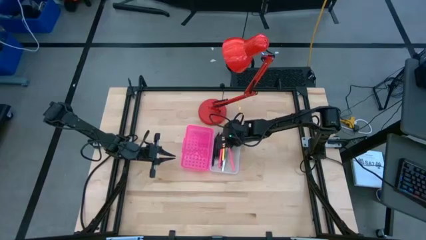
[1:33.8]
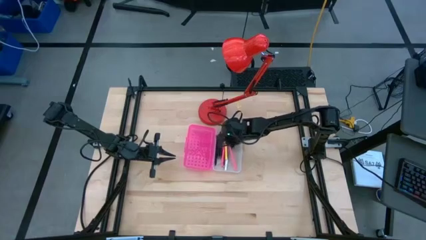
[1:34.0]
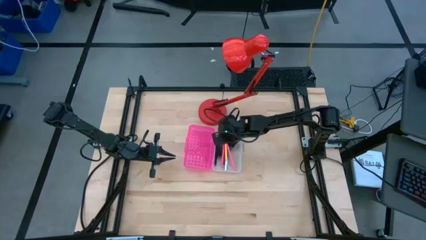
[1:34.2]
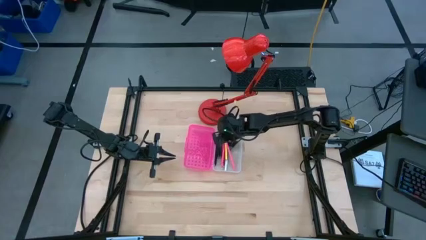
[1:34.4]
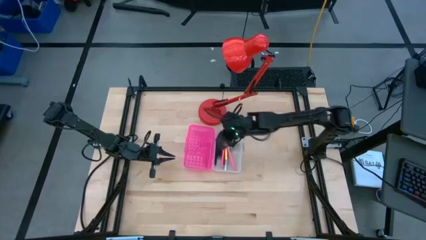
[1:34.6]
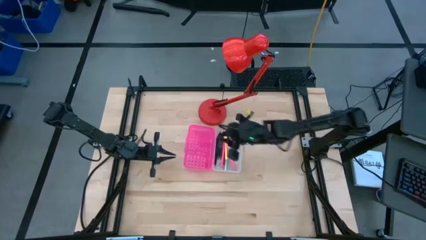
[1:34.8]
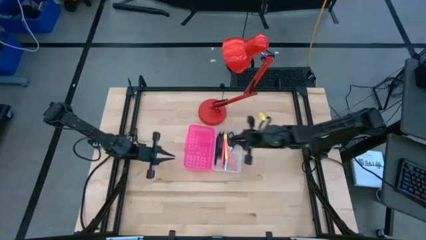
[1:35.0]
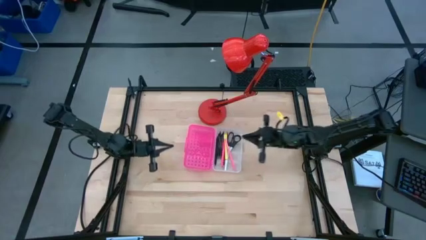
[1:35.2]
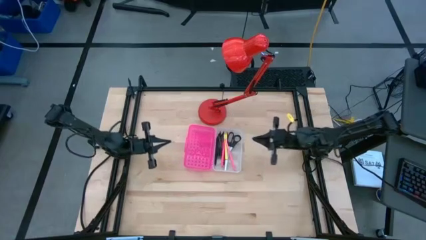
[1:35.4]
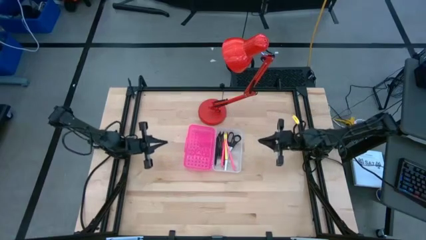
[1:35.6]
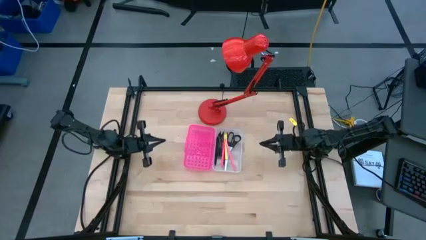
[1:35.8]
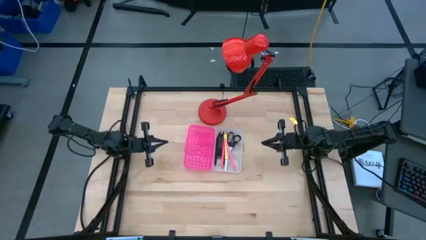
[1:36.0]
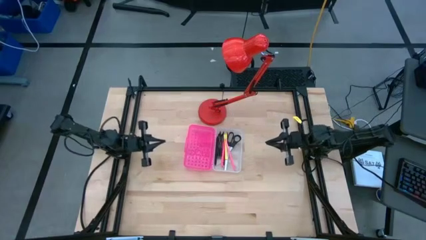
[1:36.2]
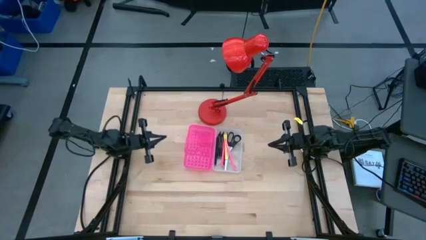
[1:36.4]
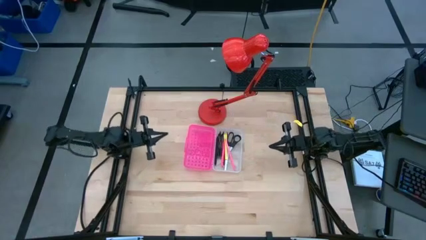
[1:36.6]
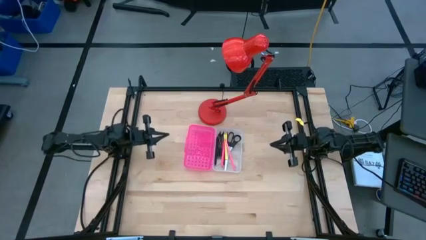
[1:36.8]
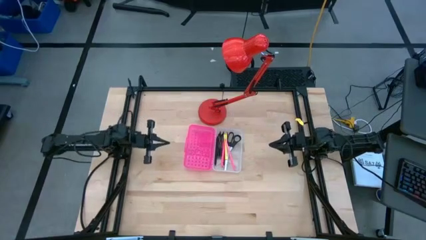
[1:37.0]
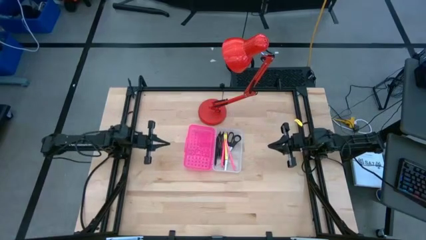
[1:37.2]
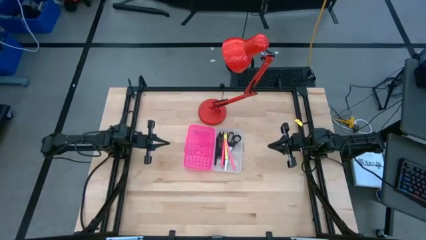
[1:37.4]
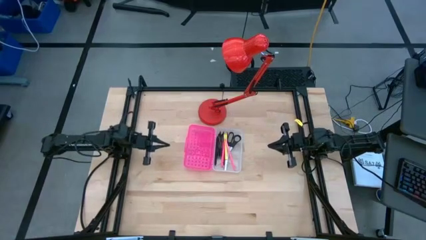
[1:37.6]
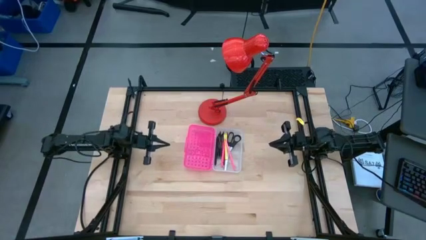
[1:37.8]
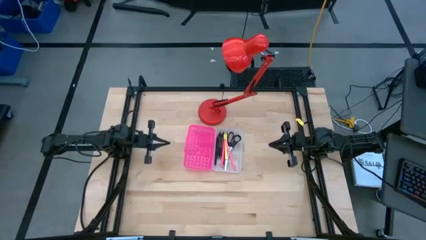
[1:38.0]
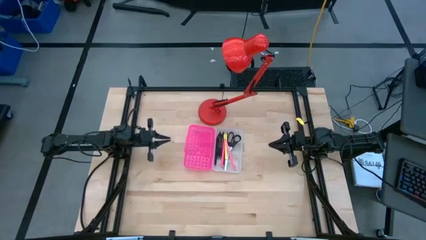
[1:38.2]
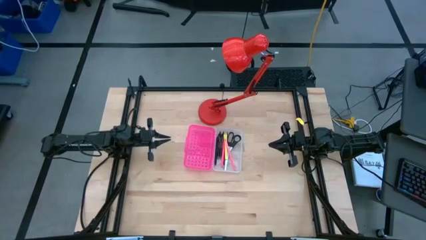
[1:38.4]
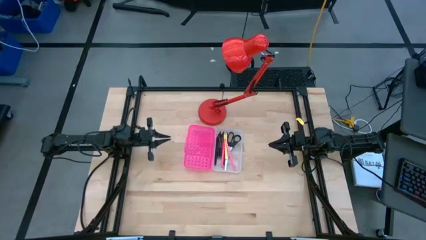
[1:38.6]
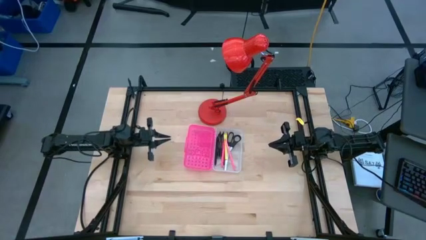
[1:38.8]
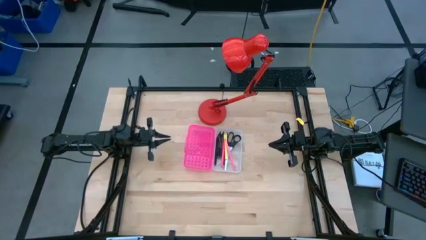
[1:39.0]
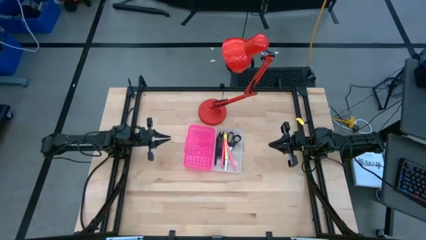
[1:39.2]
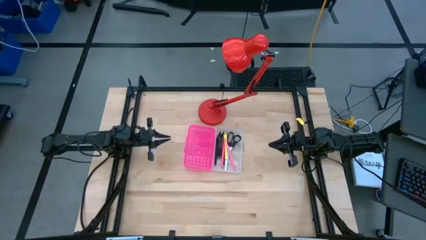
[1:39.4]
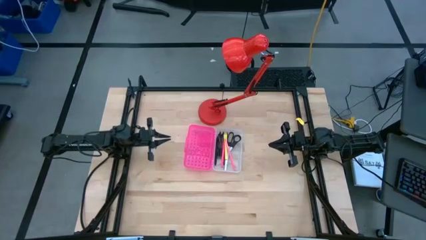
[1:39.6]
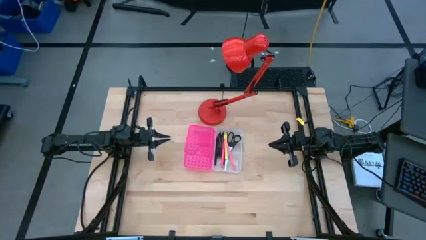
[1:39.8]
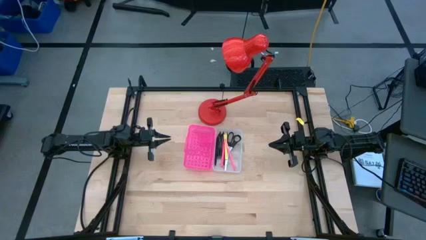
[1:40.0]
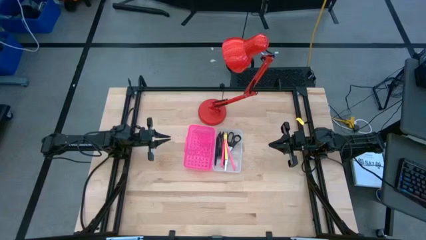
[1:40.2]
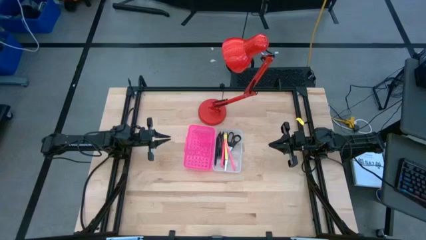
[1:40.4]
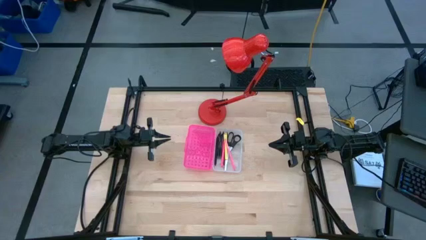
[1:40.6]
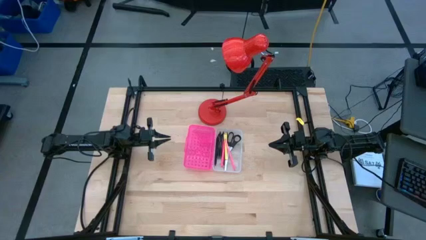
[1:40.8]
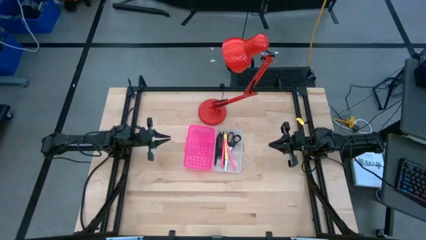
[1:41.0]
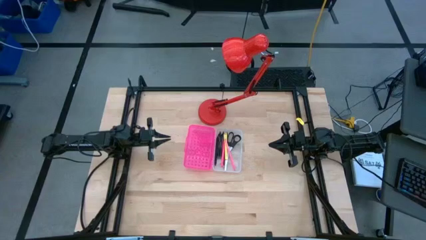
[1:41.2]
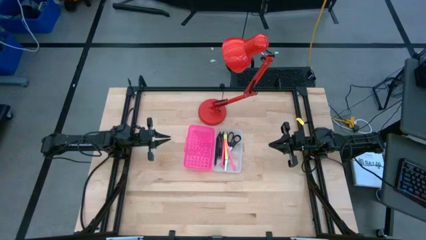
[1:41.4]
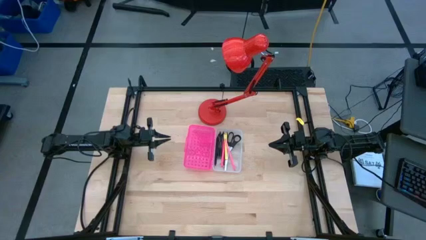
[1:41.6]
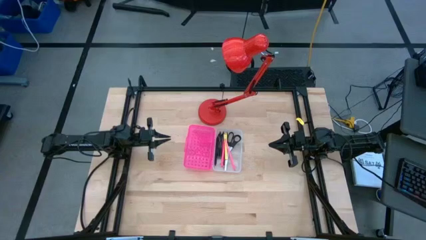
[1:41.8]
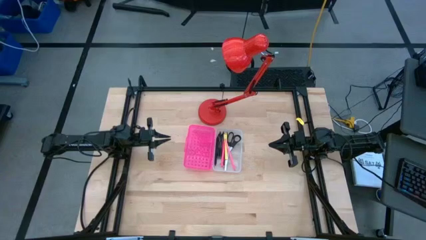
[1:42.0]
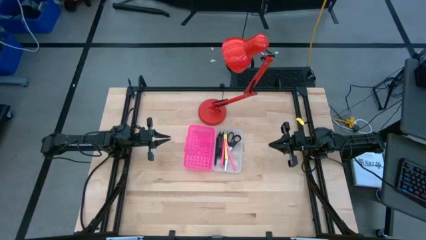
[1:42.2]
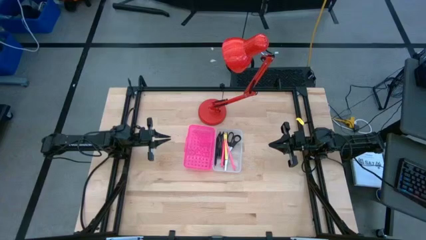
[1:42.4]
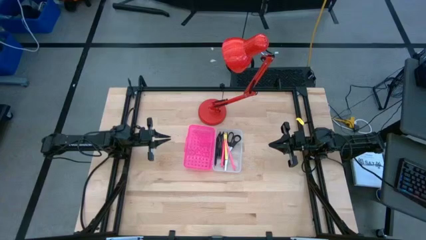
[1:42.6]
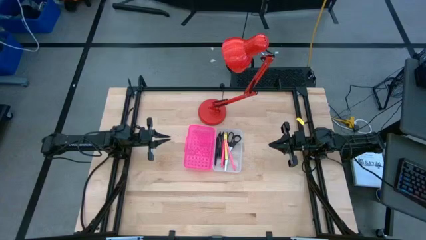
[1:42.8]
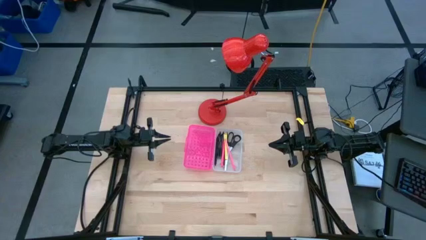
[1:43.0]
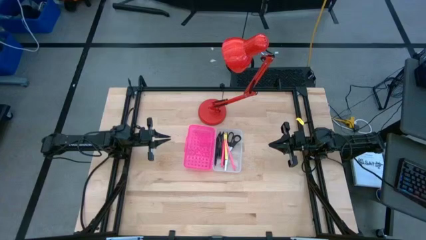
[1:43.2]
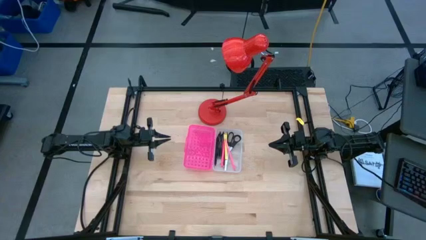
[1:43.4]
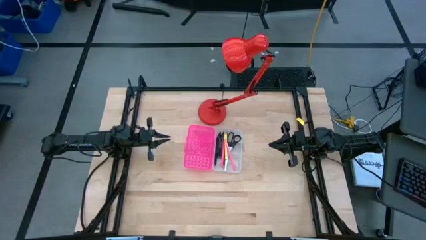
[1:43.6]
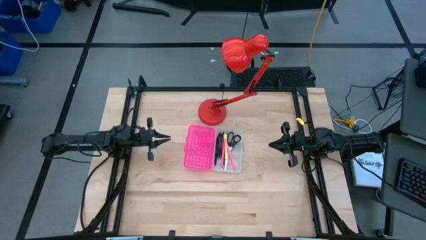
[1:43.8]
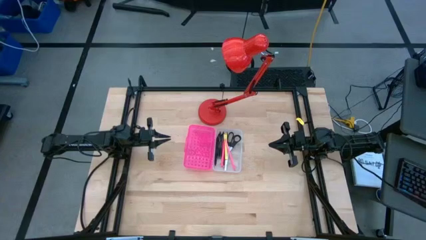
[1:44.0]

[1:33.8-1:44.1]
Task: Pick & place school supplies into a supply box
Return to Home Position

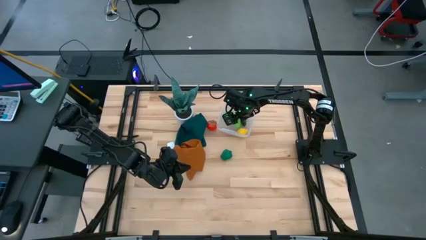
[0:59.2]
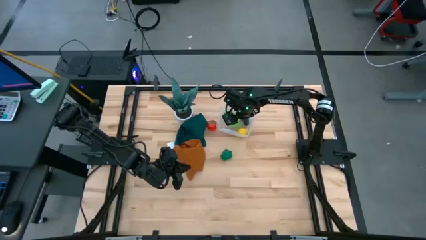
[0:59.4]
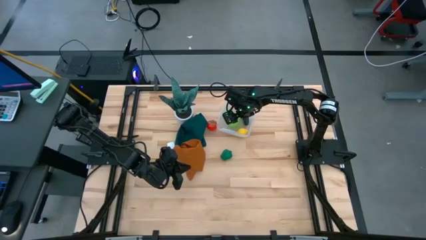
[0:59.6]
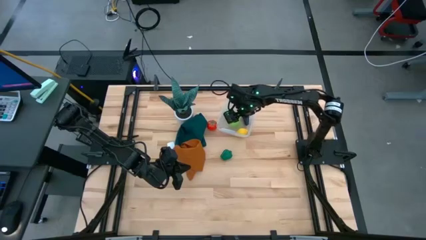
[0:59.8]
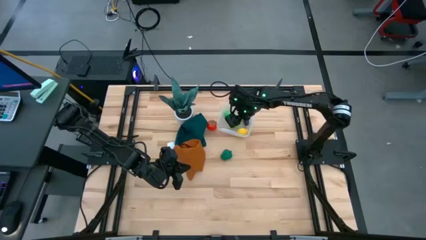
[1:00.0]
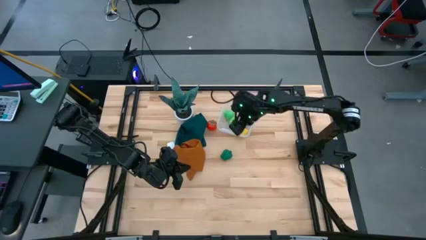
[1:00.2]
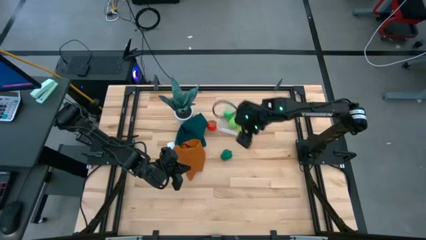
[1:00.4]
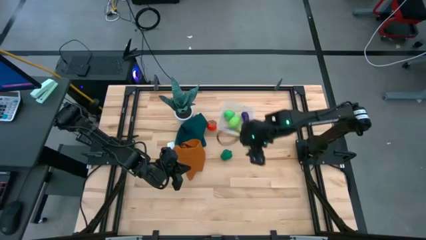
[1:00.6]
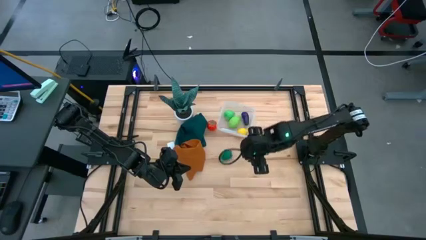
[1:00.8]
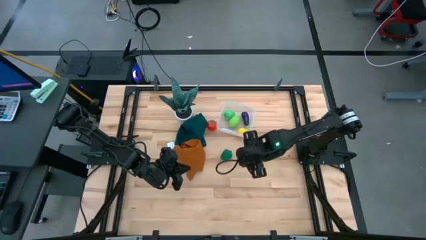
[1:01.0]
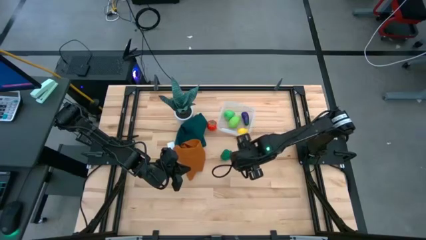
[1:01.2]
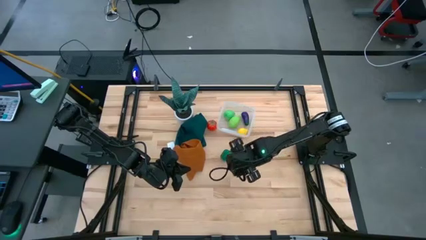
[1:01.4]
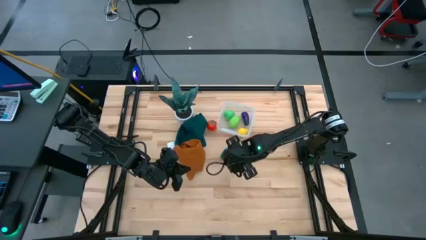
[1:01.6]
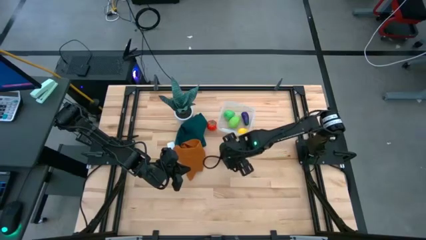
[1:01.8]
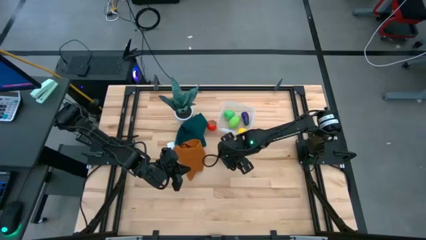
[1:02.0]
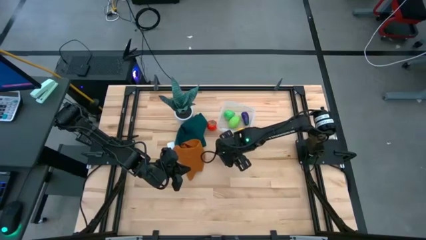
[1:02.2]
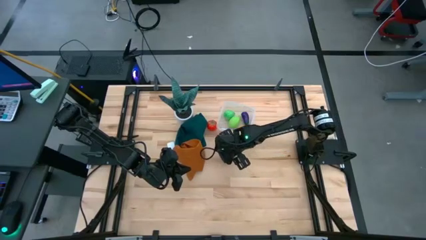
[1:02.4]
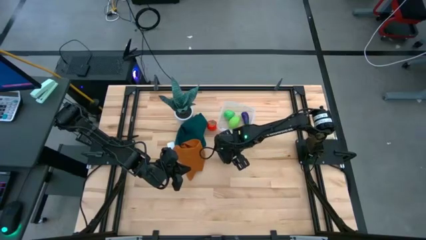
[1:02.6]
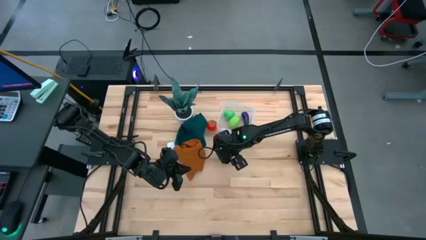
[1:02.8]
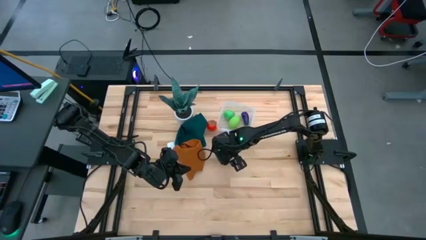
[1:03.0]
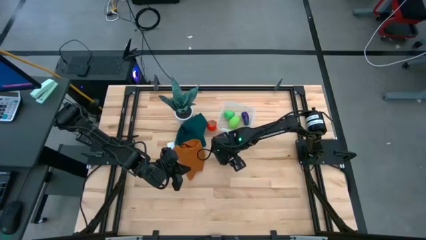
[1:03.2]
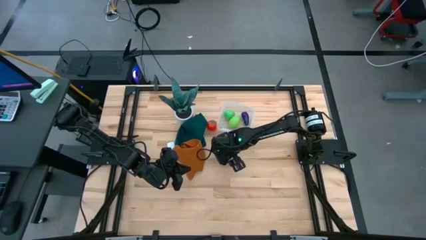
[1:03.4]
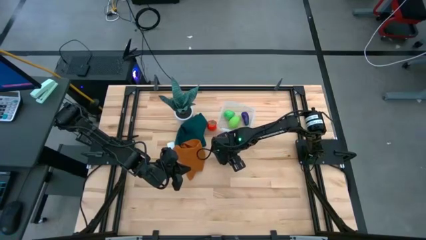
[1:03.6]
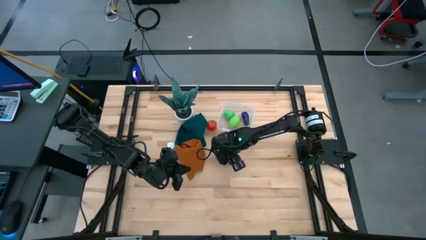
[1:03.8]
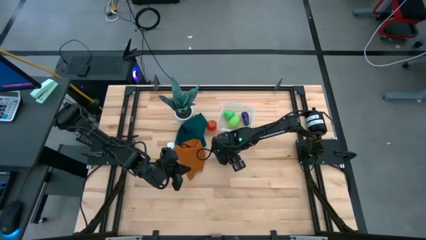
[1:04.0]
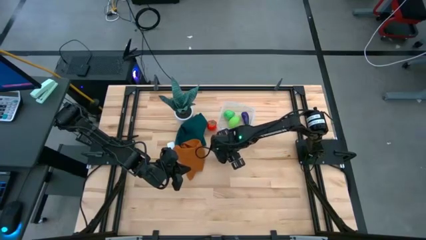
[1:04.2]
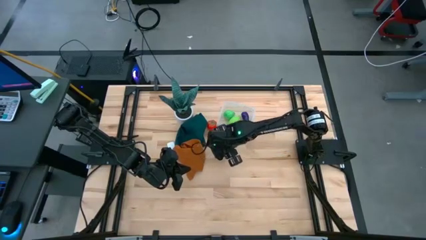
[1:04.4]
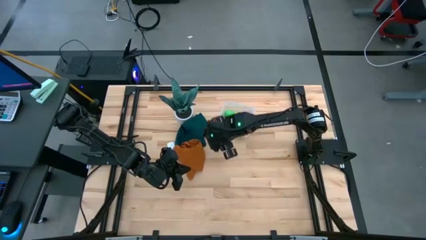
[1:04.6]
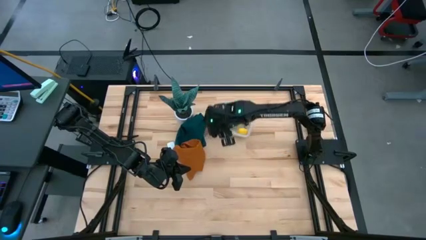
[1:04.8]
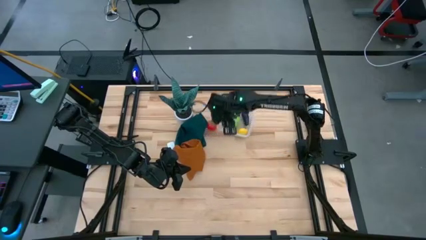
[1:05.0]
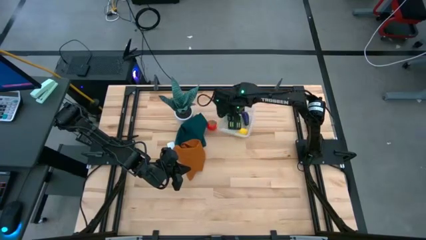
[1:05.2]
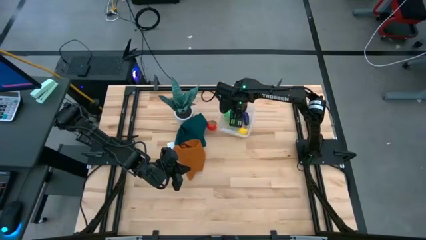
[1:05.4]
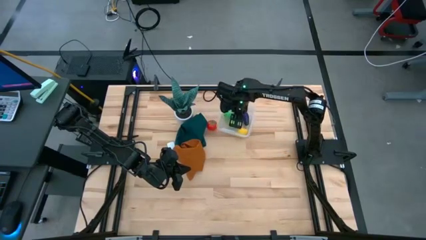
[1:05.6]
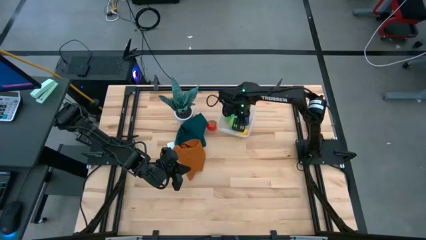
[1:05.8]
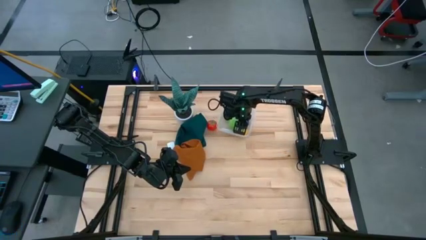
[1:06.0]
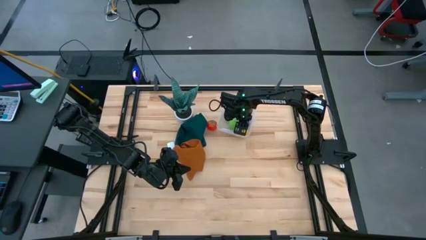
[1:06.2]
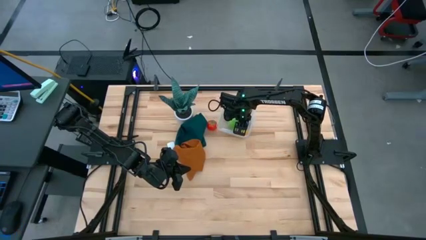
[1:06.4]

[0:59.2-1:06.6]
Task: Pick and placing Produce into tupperware
Put the green bell pepper into the transparent bin
